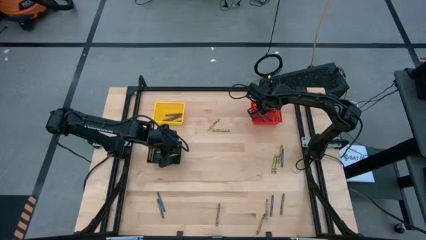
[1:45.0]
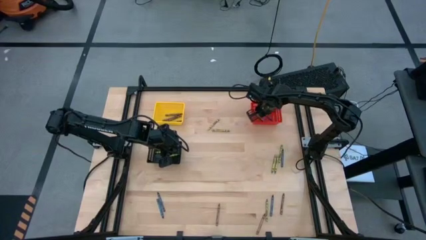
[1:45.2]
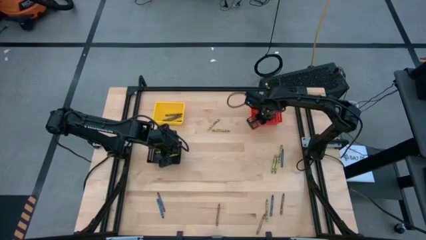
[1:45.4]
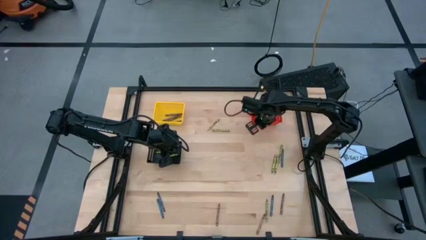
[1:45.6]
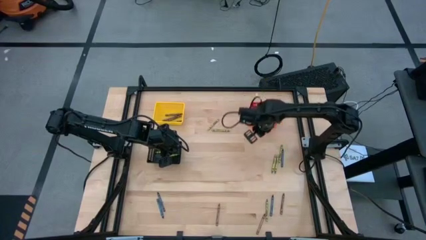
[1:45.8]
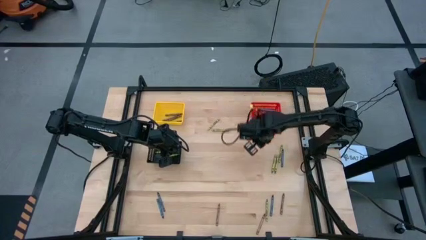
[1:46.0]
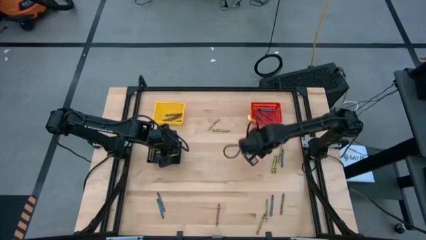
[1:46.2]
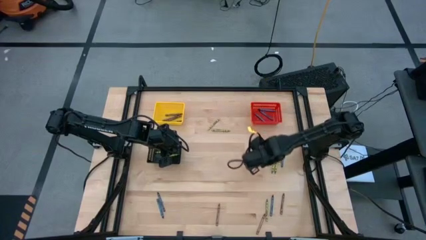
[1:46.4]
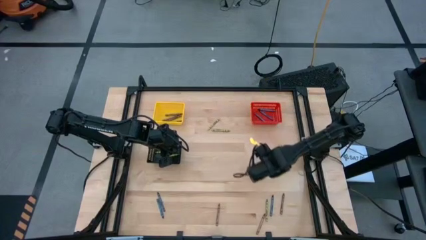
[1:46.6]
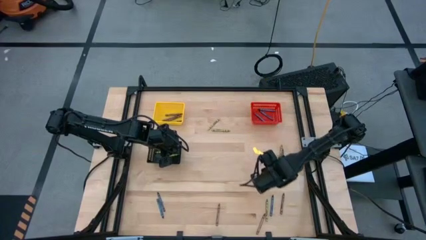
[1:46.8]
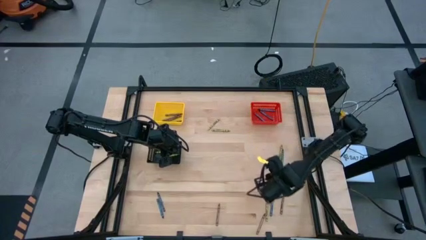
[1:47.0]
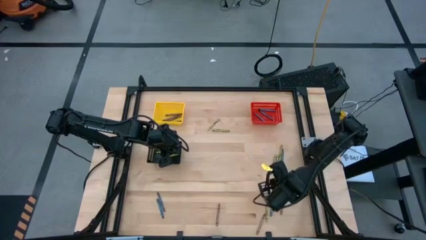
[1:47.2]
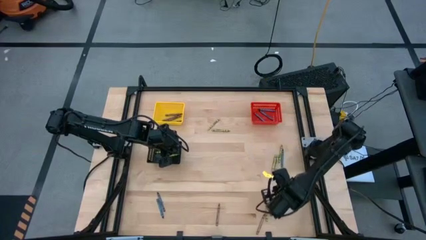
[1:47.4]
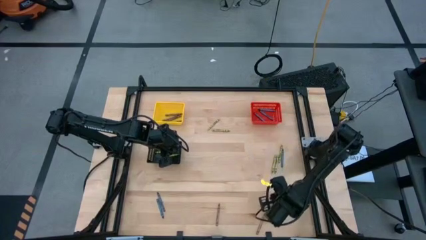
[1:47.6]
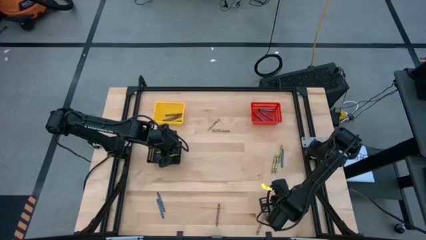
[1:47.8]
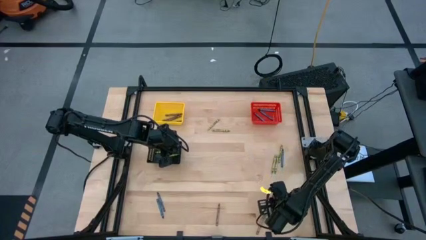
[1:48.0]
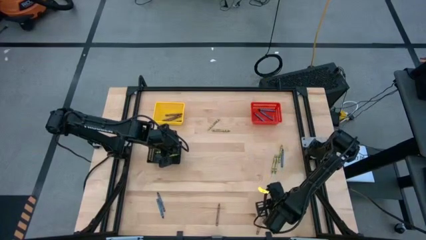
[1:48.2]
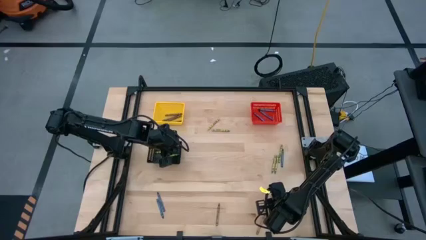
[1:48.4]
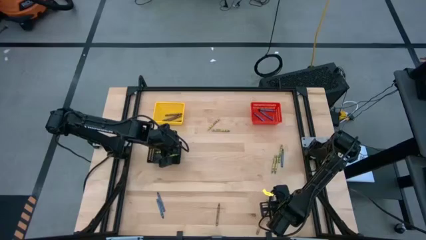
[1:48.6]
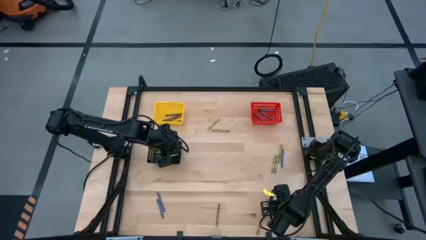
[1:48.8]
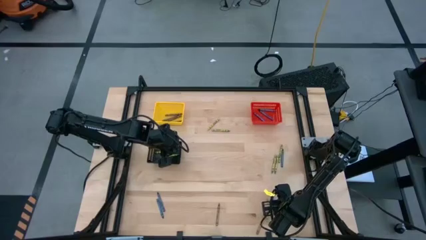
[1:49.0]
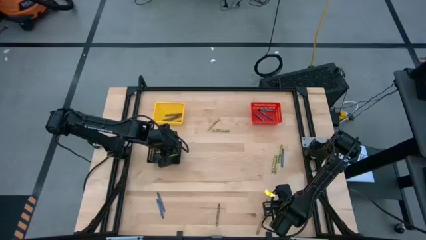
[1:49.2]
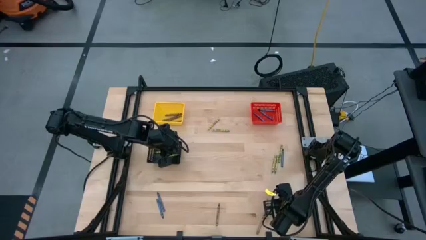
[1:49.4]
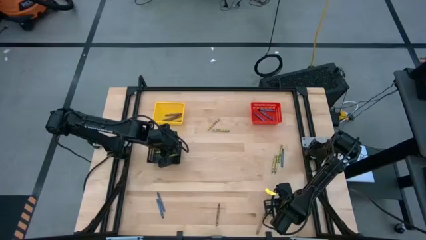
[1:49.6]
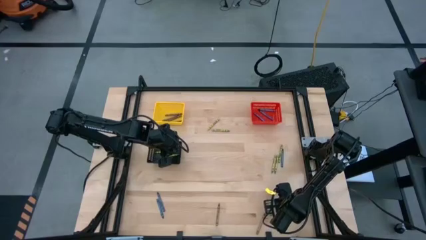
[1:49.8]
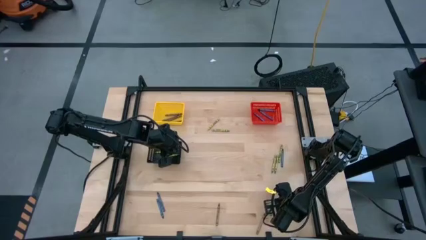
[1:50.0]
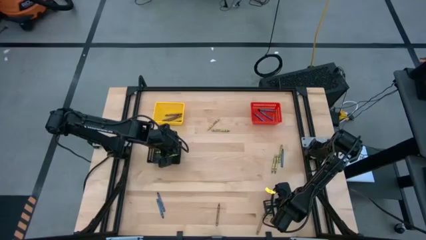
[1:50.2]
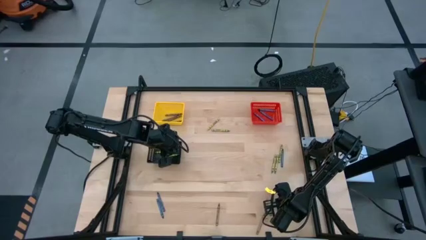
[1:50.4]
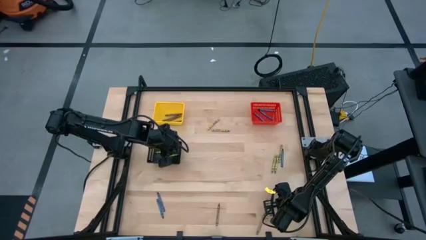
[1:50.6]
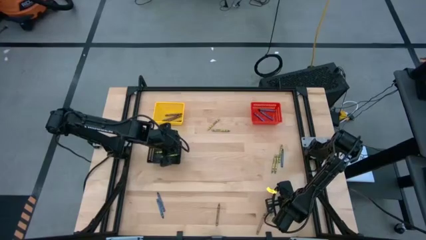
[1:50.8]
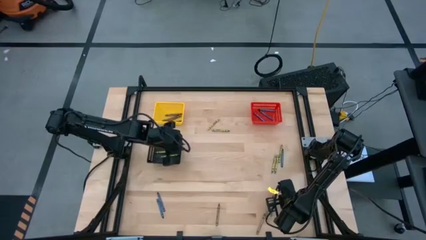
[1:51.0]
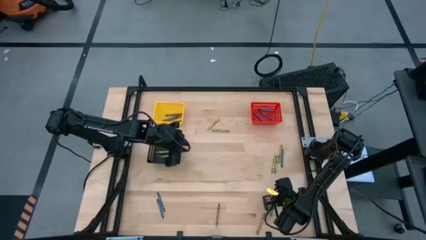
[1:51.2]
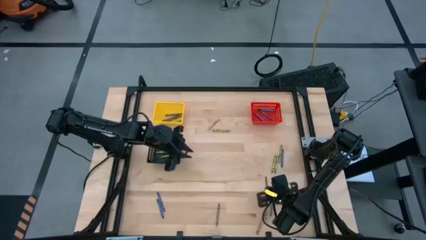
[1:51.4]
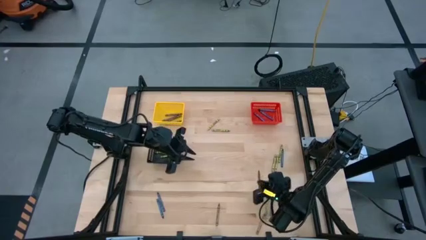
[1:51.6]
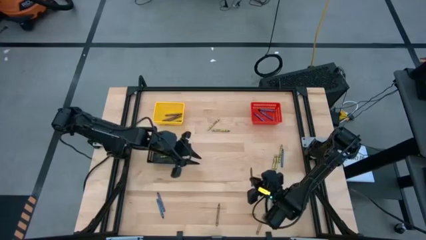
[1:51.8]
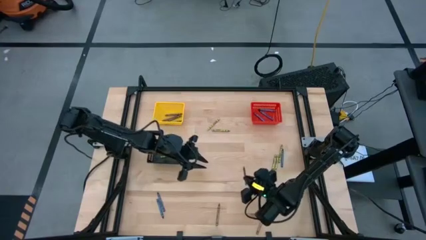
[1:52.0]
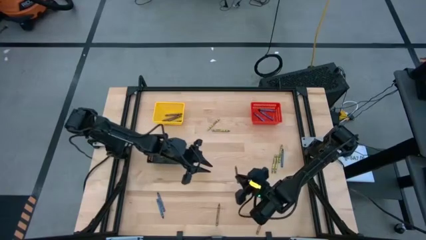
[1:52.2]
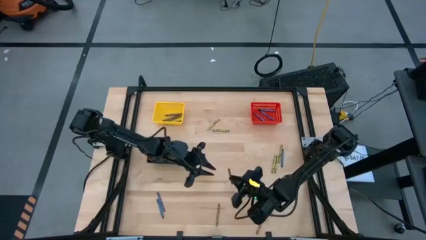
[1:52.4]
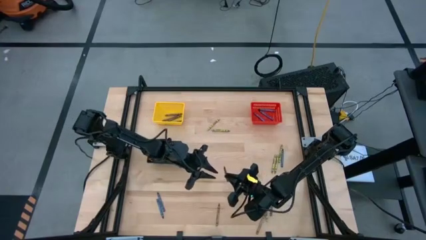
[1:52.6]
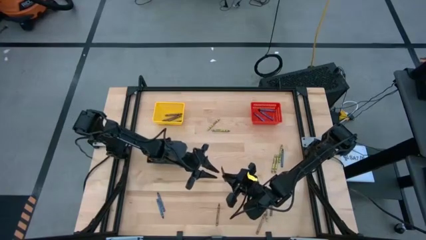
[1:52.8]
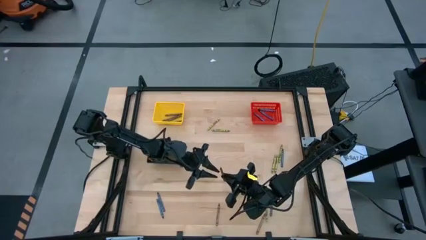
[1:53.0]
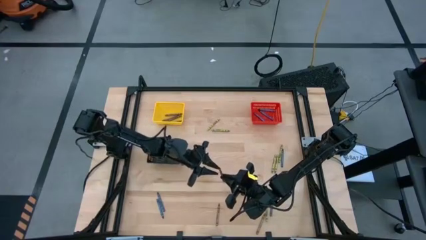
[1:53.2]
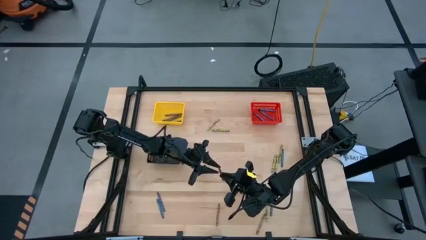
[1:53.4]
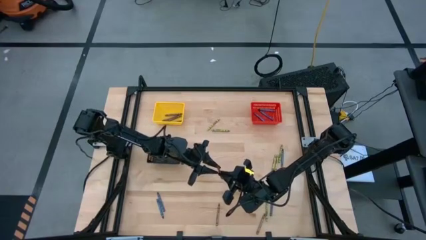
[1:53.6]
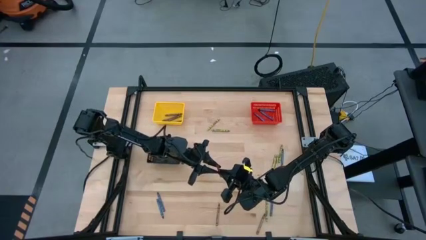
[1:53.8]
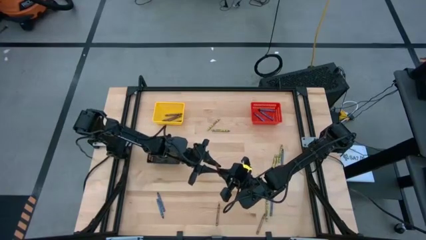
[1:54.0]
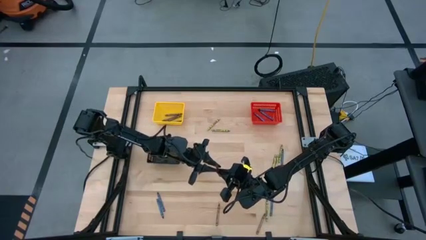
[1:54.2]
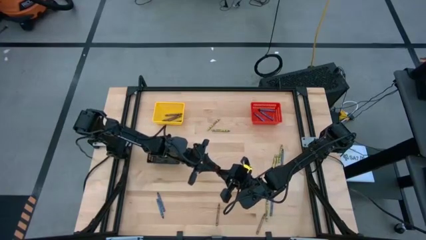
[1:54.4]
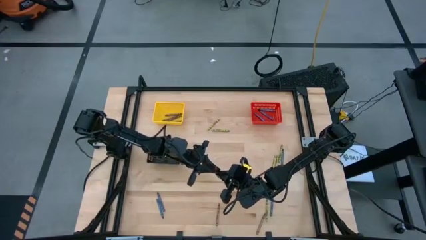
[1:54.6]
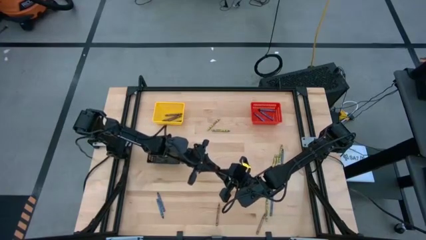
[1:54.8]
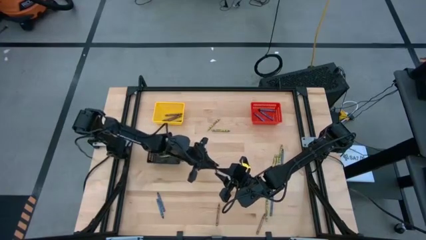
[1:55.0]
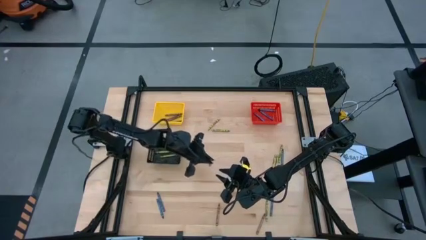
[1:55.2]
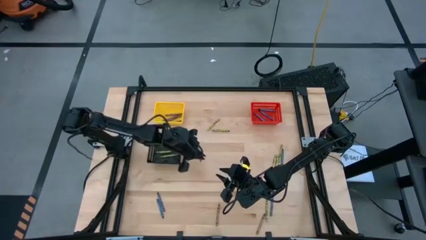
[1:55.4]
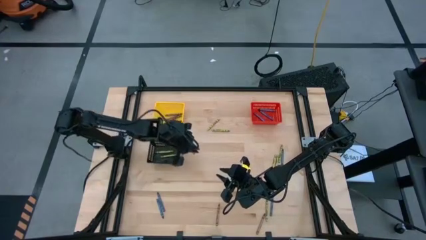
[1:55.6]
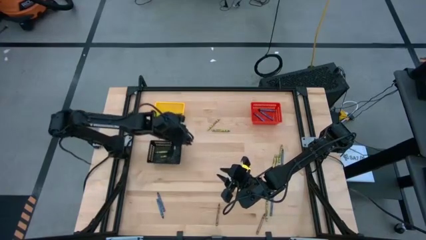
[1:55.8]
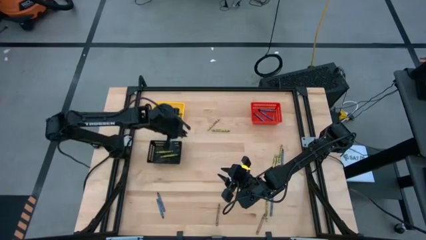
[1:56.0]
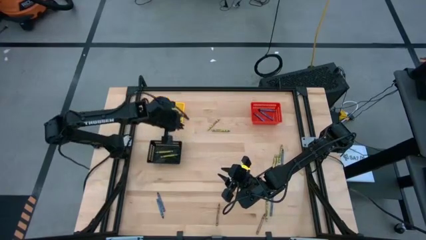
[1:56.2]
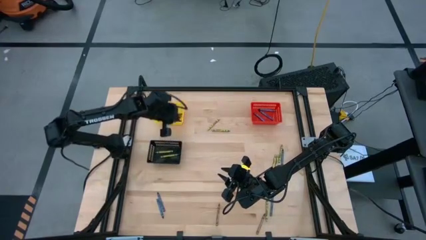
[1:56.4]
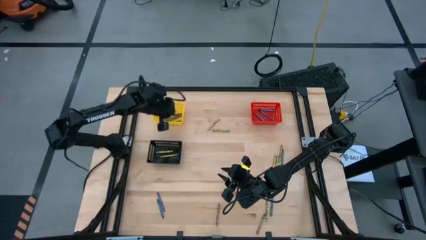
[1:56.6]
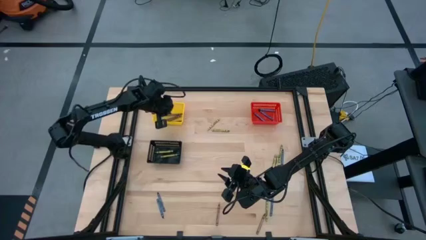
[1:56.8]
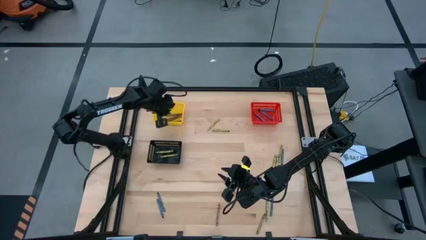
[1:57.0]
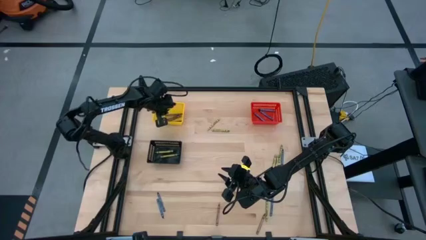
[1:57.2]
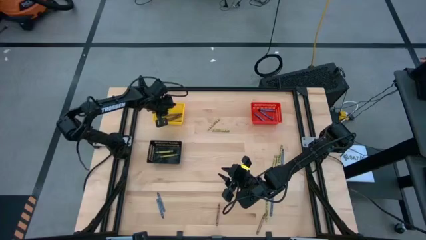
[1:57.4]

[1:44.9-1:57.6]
Task: Sort crayons
Put the brown crayon into the yellow bin

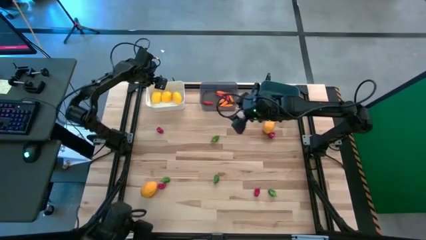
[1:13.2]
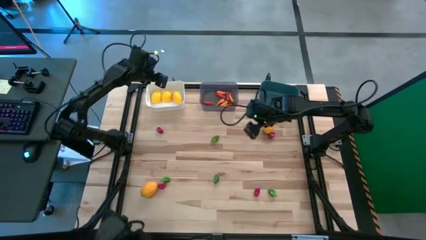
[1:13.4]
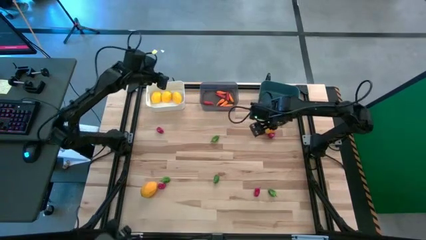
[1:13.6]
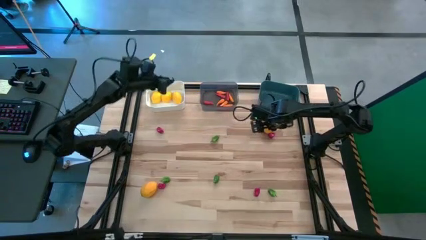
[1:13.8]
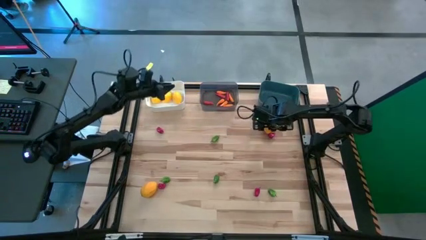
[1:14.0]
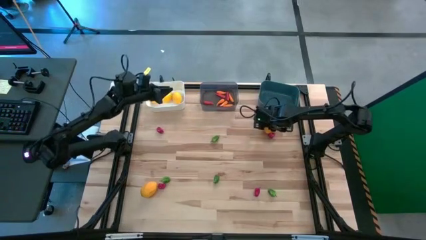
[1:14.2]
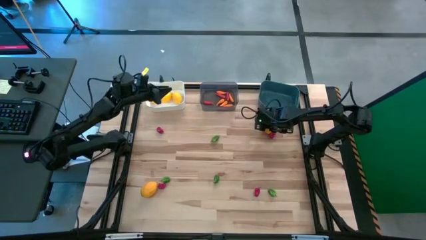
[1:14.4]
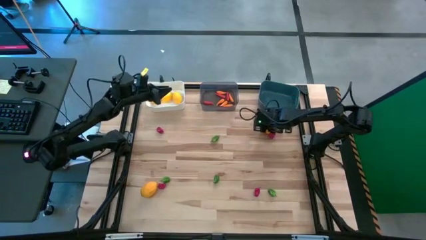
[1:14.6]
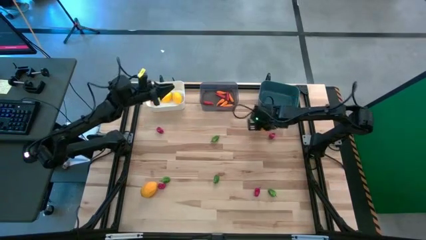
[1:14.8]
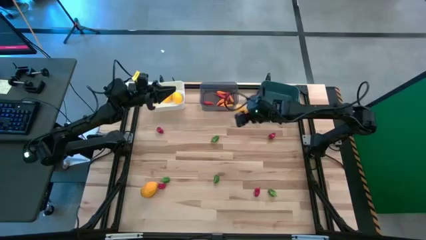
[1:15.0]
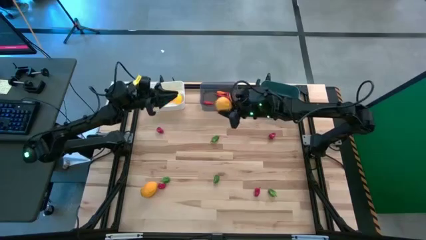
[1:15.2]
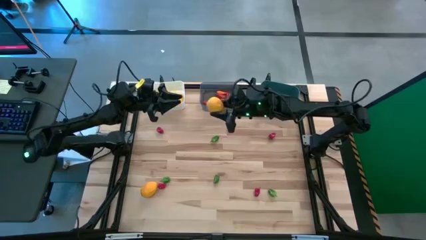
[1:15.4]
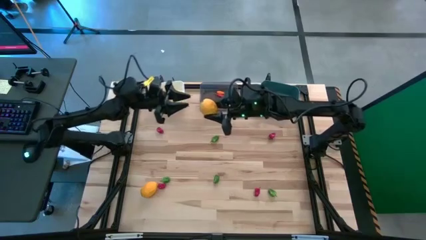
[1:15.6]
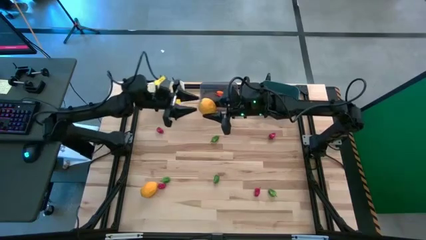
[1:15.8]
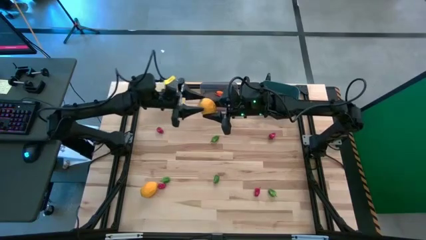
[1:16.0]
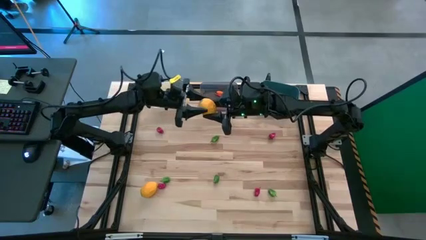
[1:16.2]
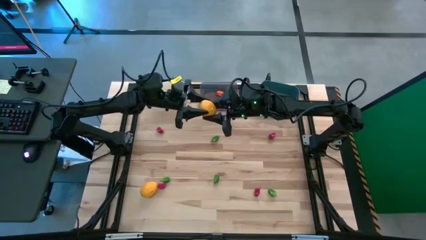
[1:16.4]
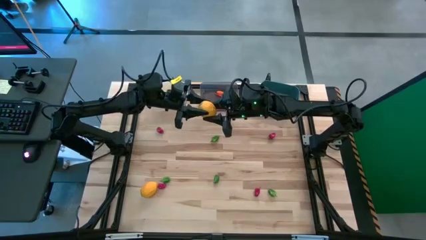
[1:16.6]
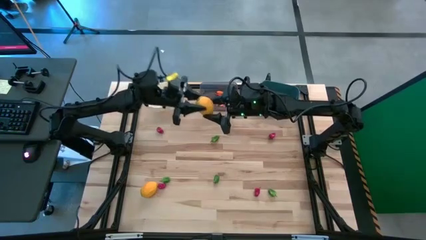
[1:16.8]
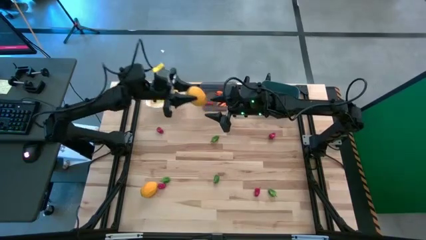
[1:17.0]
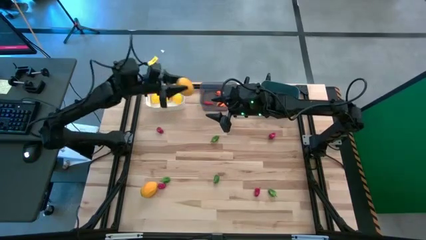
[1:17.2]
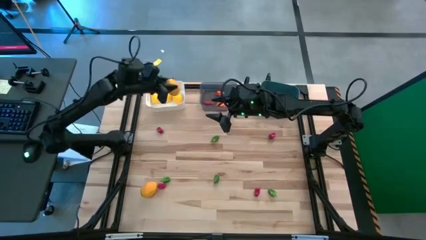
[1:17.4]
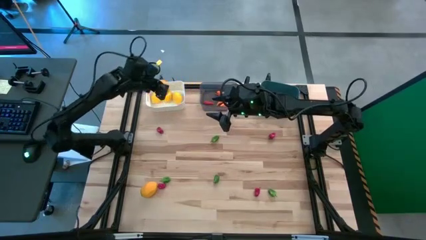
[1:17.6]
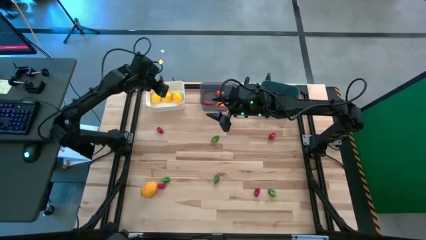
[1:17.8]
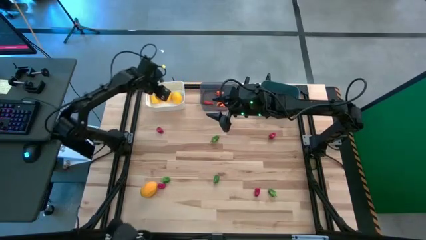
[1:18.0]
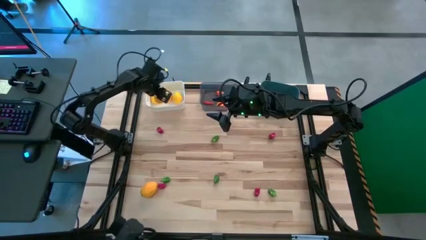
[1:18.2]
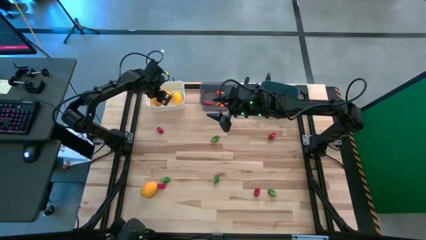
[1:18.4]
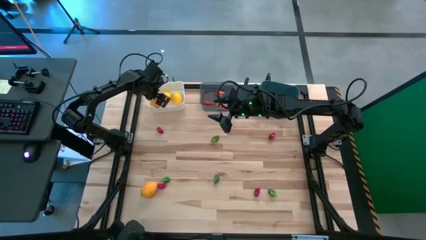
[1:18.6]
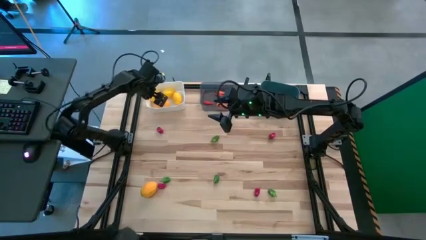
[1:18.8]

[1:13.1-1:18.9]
Task: Sort produce into baskets
Put the top yellow lemon into the white bin
